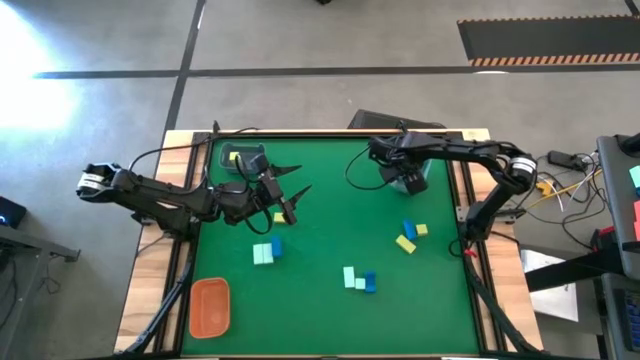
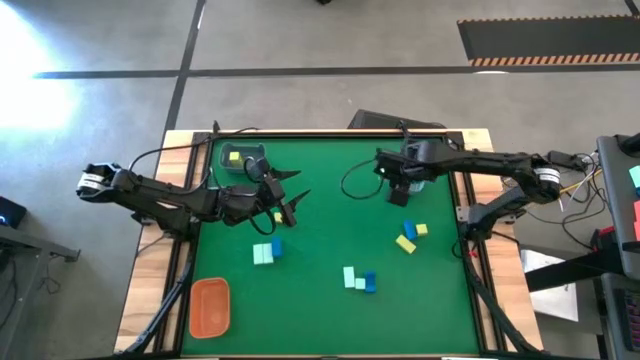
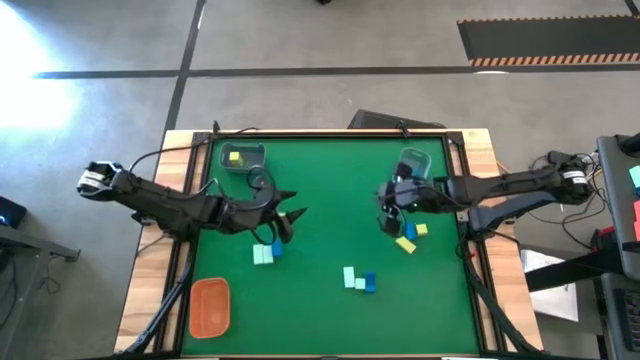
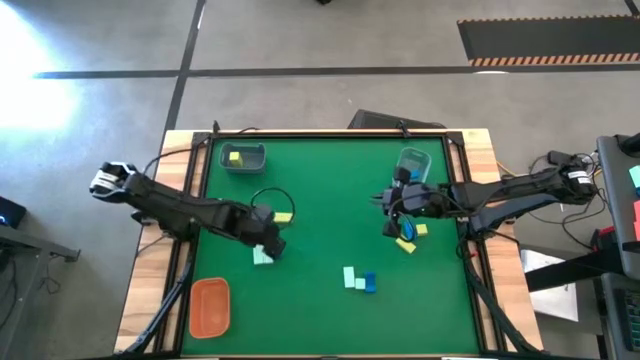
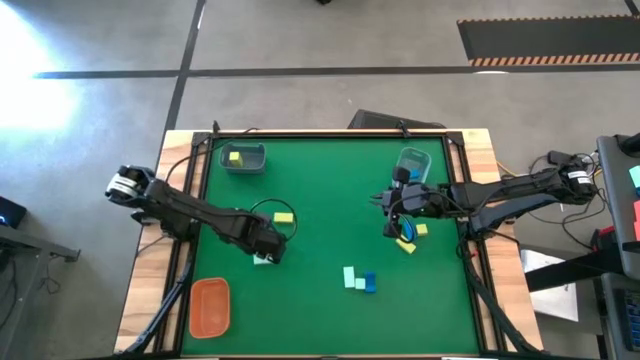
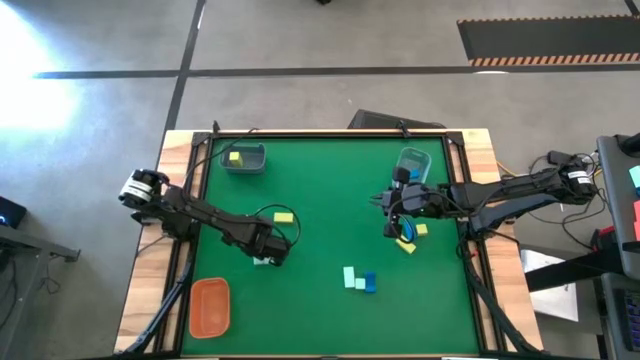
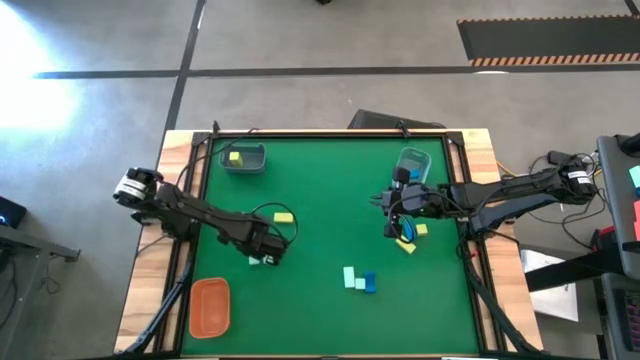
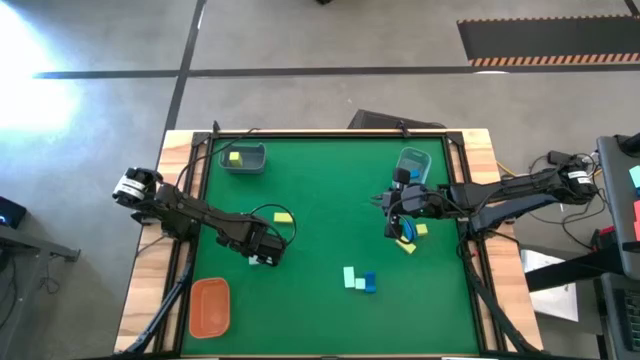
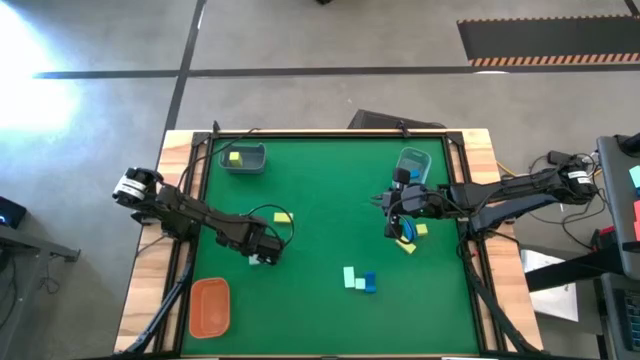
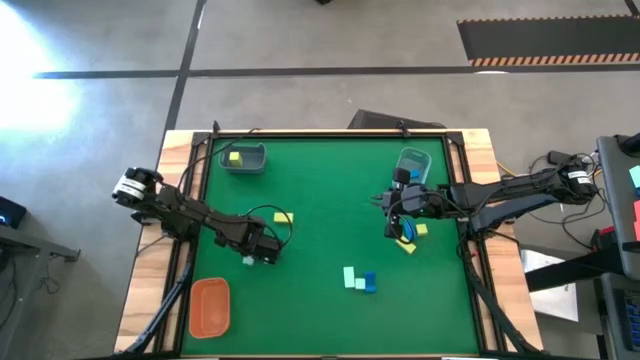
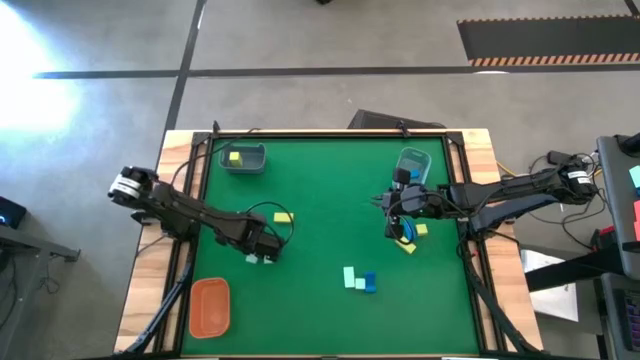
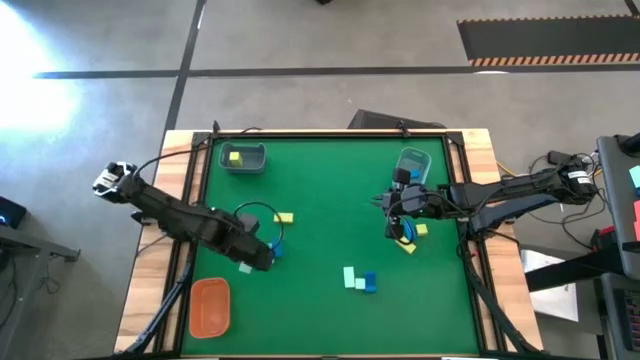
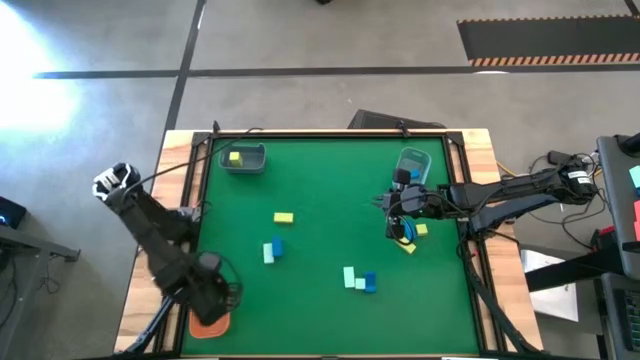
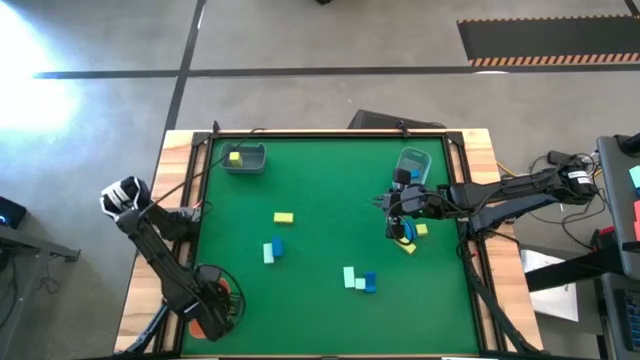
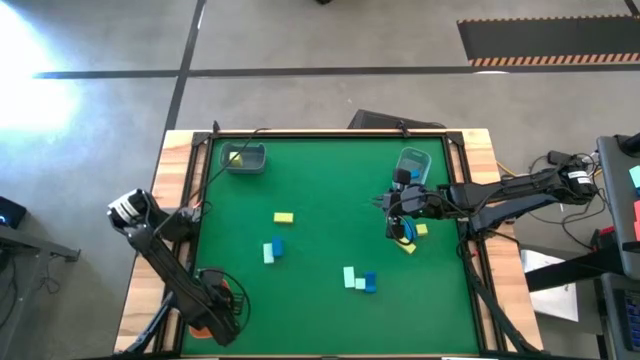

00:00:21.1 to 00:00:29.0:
Task: Sort & place blocks by color
Put the light blue block into the orange bin

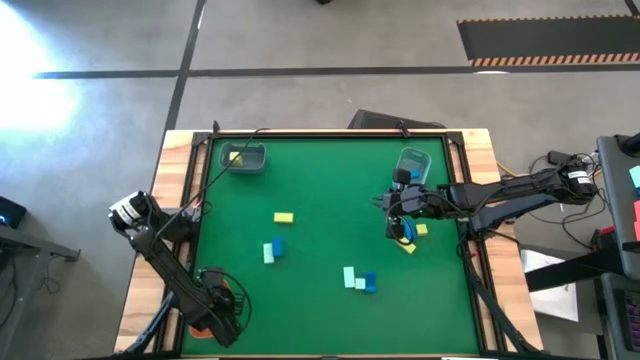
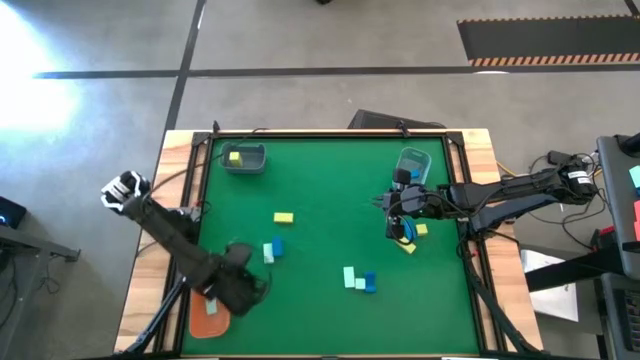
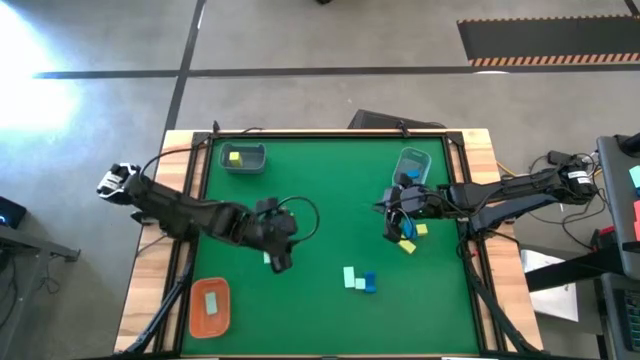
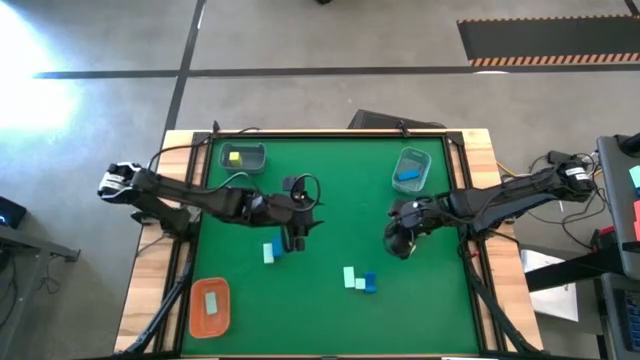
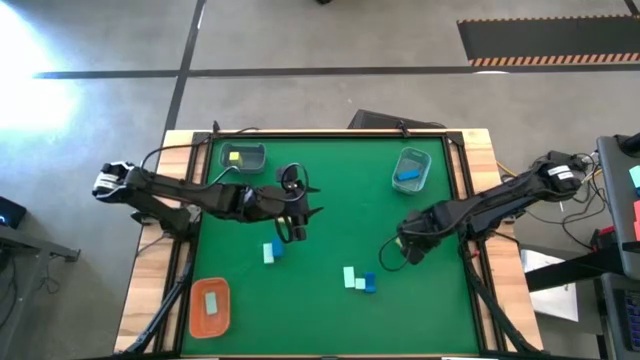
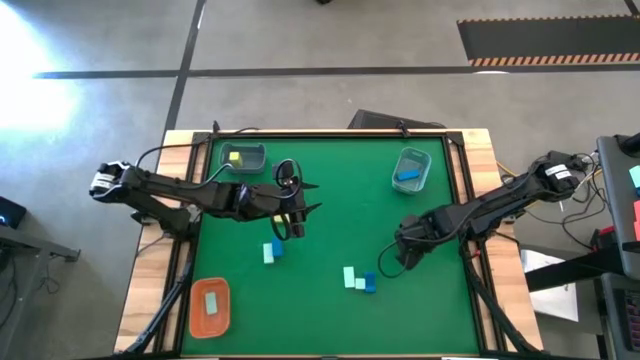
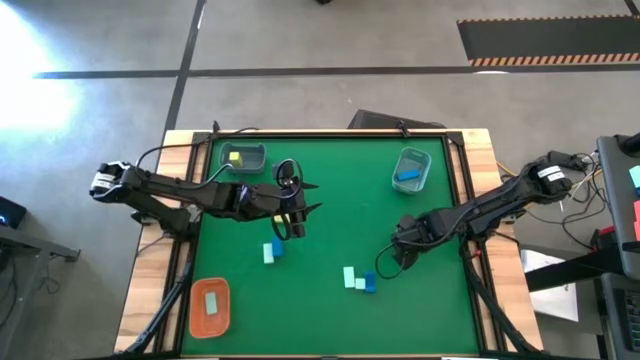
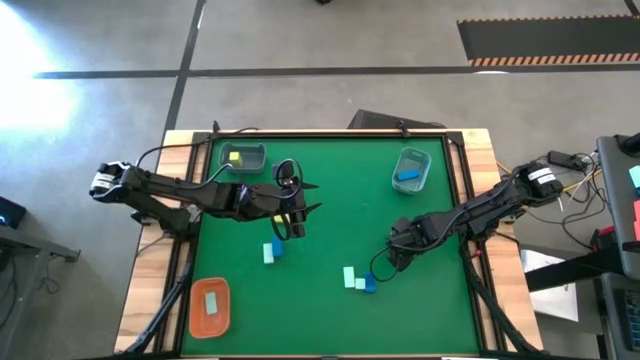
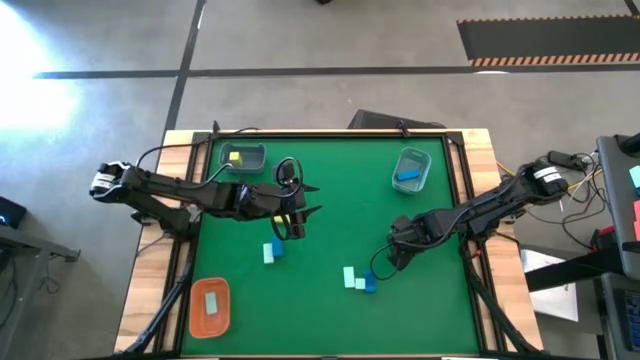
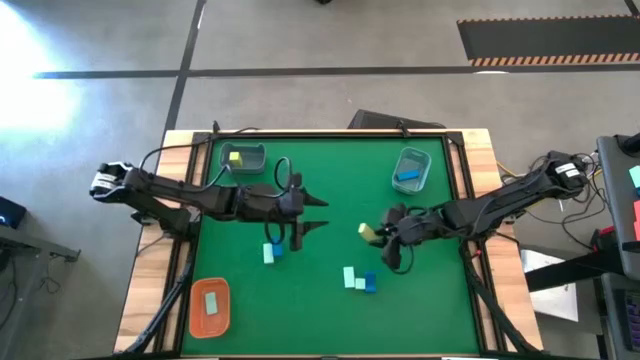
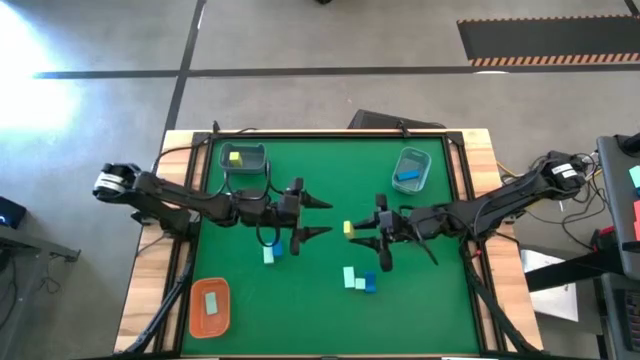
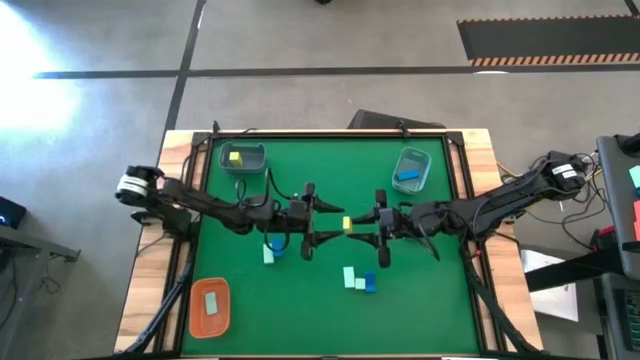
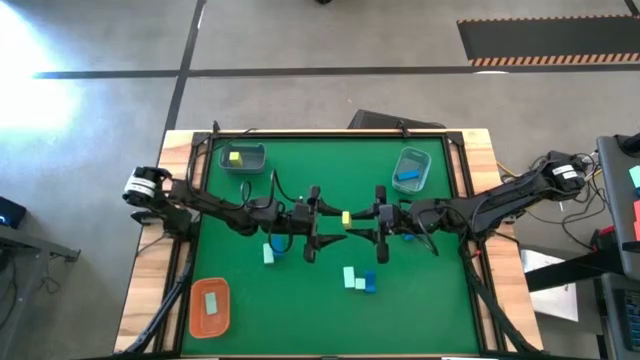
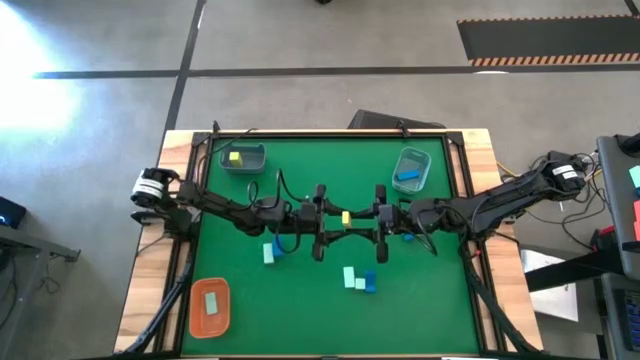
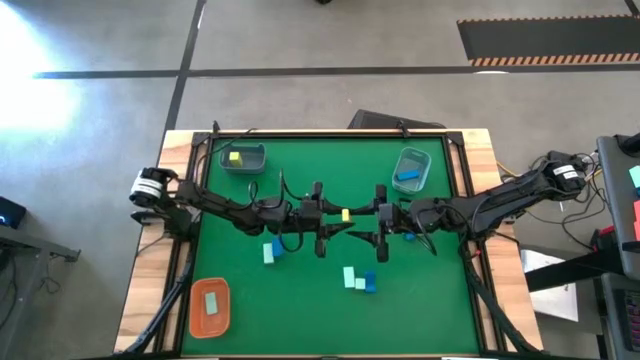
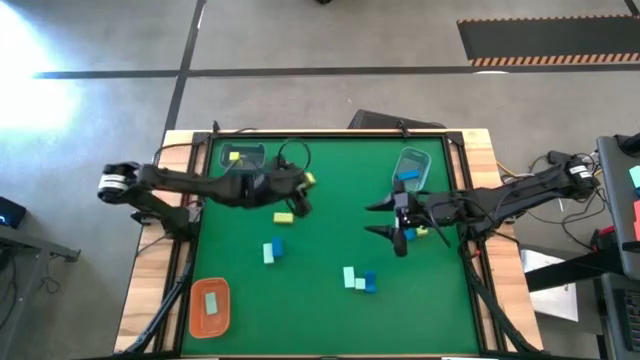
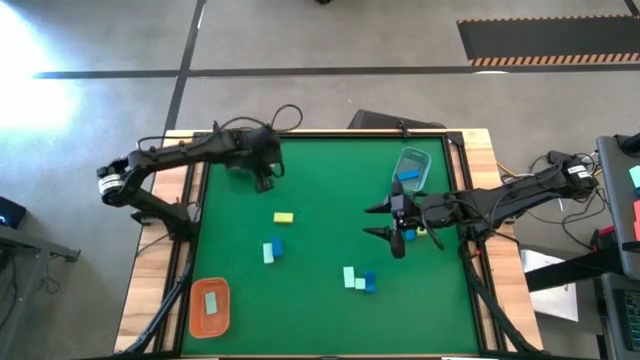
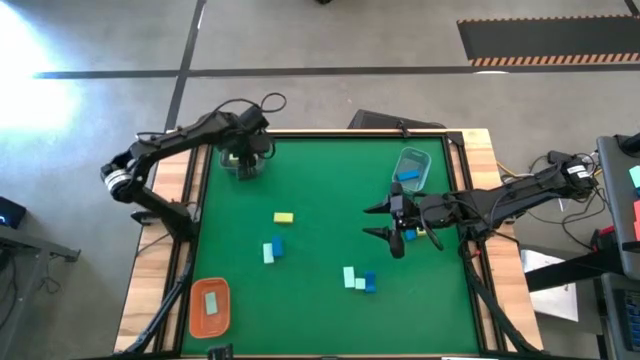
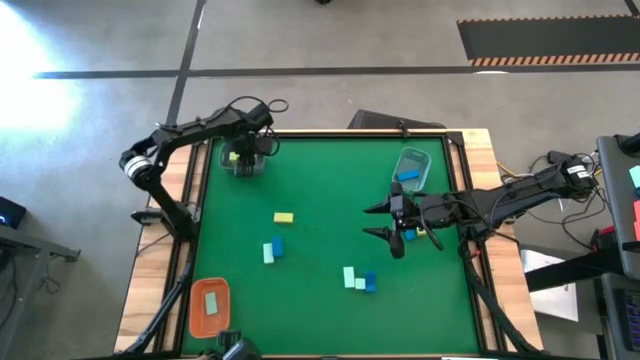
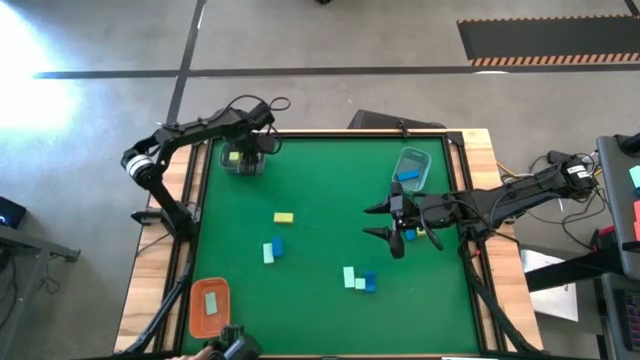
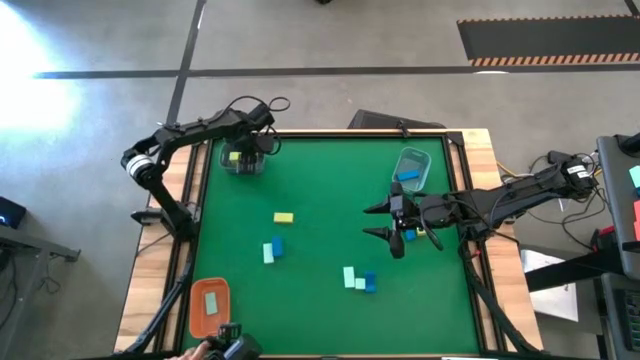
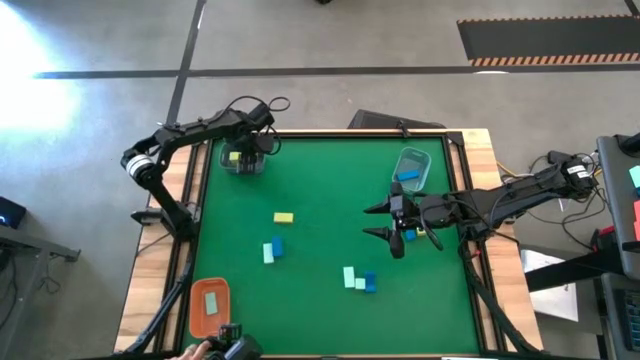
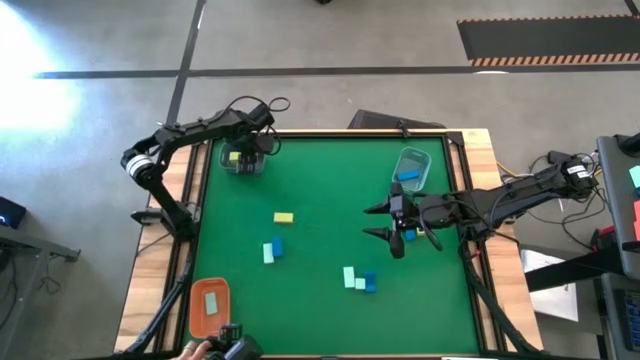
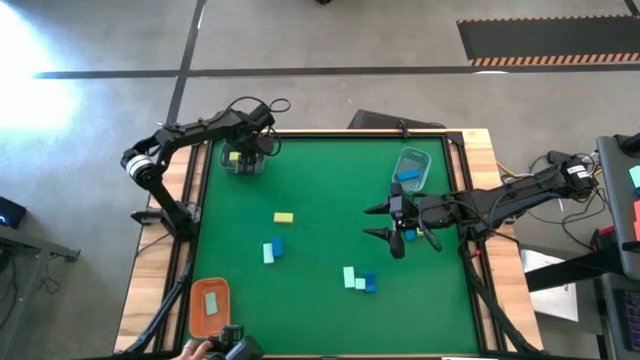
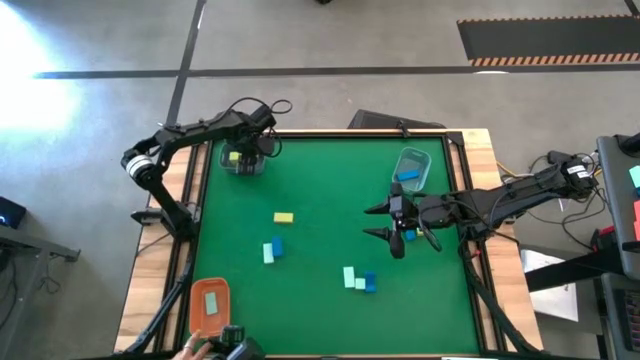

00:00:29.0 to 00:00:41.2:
Put the yellow block into the blue bin
